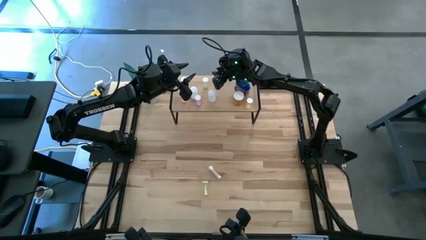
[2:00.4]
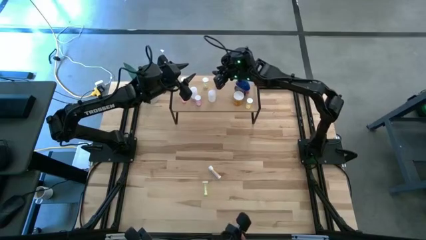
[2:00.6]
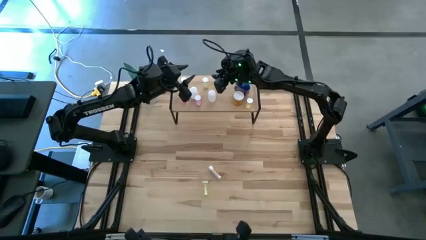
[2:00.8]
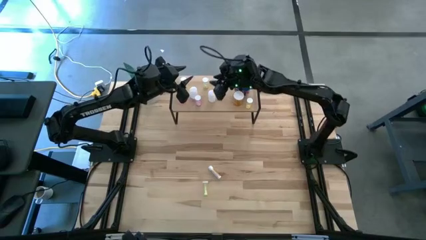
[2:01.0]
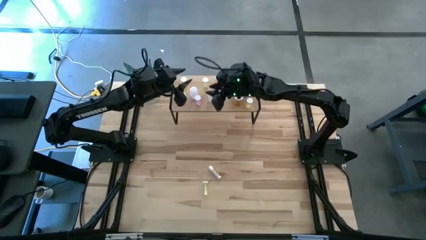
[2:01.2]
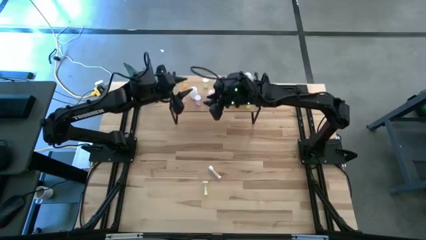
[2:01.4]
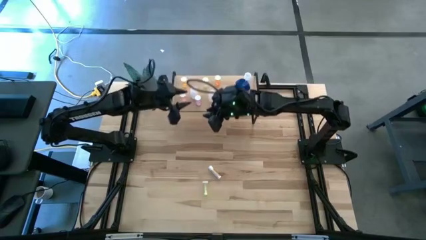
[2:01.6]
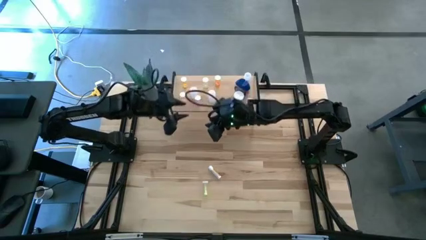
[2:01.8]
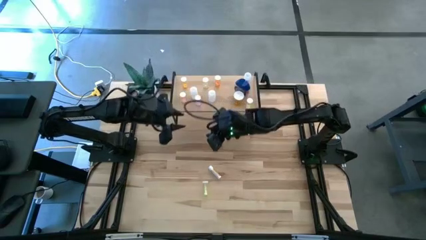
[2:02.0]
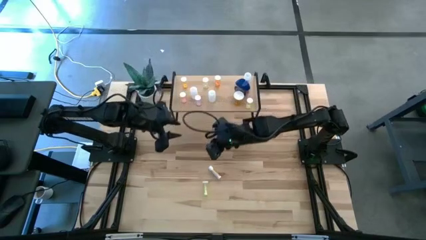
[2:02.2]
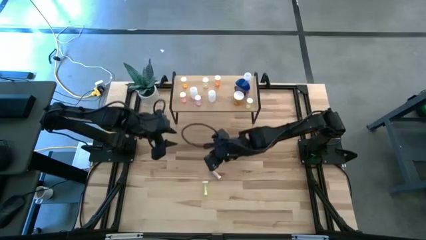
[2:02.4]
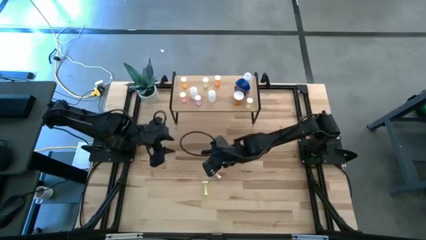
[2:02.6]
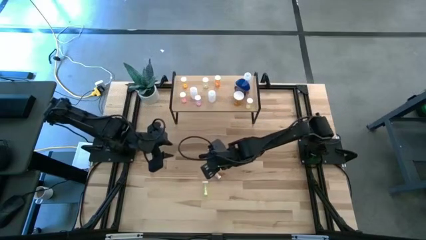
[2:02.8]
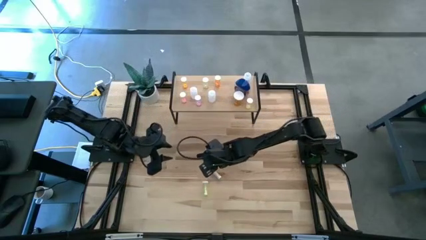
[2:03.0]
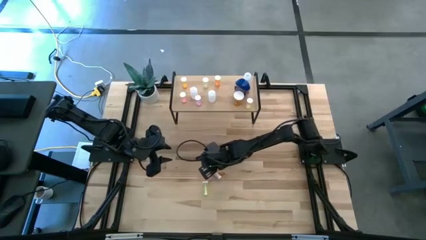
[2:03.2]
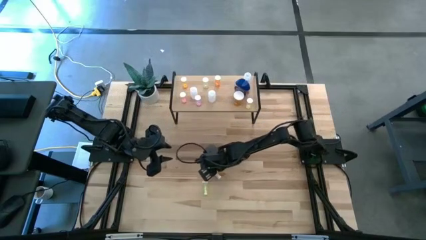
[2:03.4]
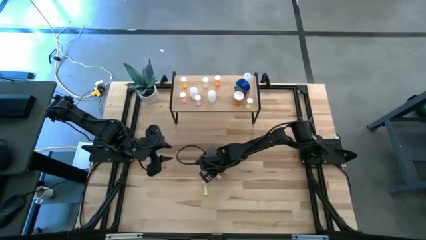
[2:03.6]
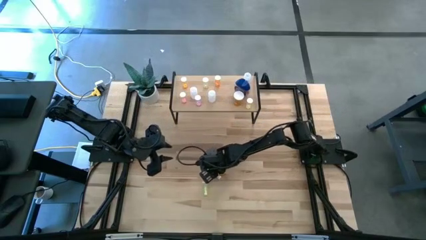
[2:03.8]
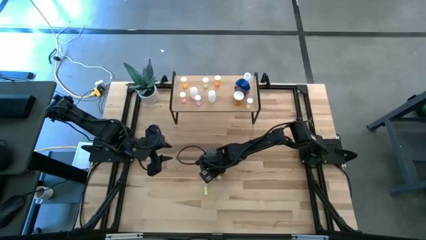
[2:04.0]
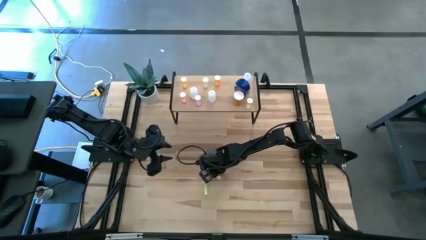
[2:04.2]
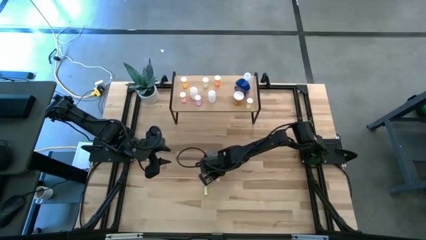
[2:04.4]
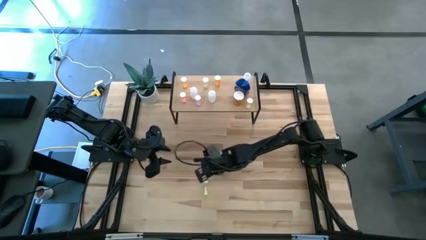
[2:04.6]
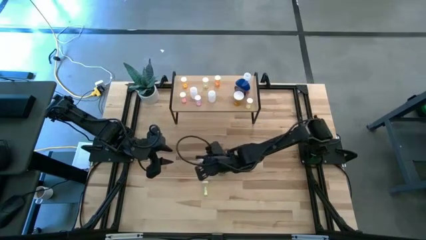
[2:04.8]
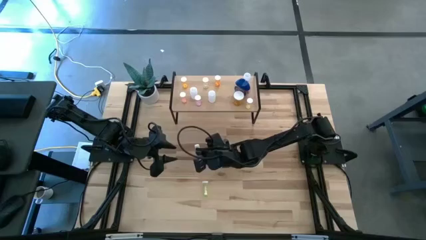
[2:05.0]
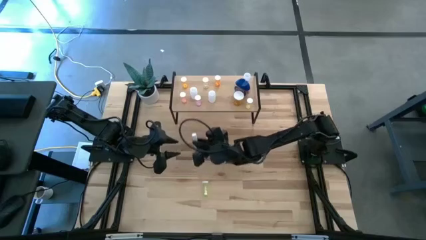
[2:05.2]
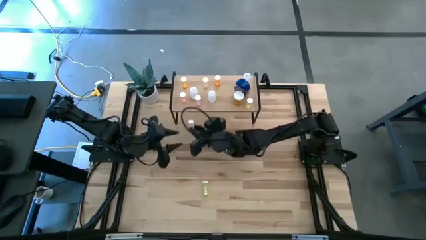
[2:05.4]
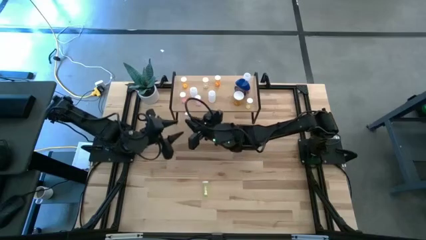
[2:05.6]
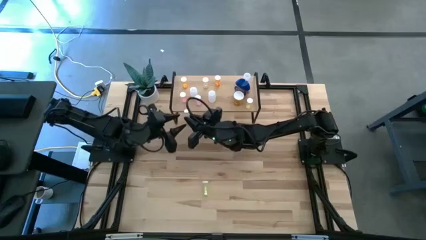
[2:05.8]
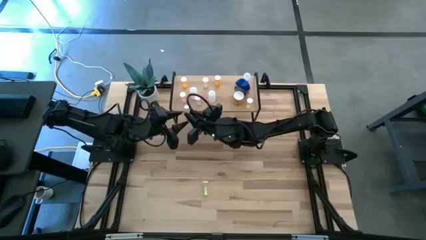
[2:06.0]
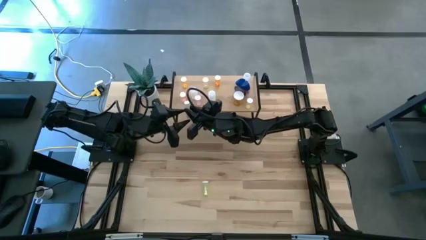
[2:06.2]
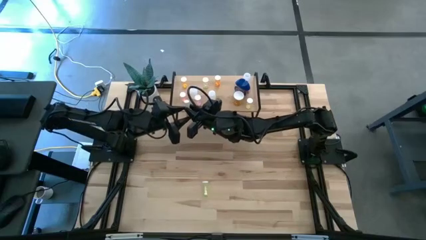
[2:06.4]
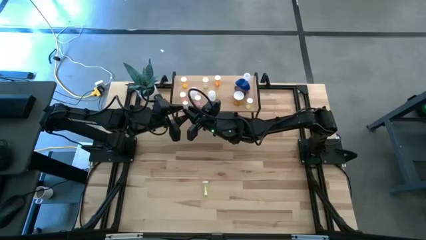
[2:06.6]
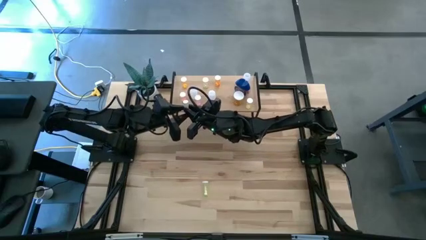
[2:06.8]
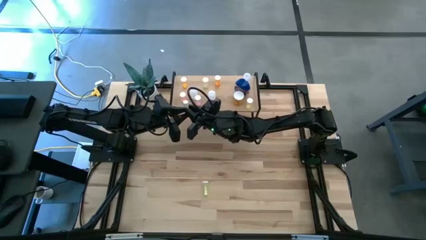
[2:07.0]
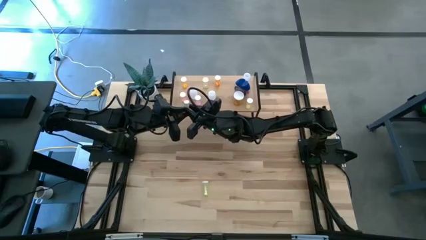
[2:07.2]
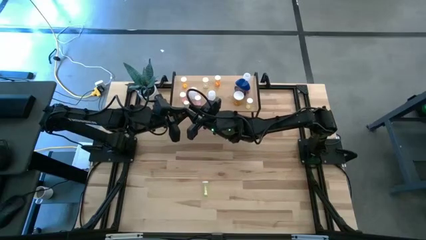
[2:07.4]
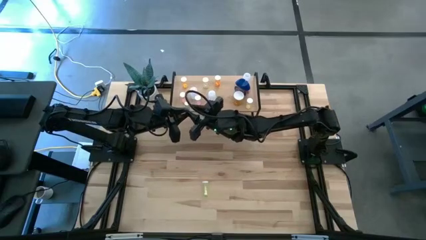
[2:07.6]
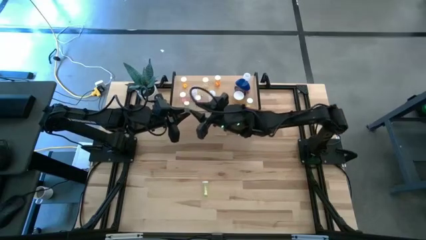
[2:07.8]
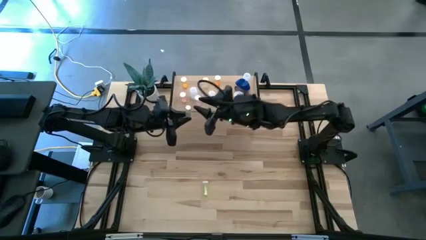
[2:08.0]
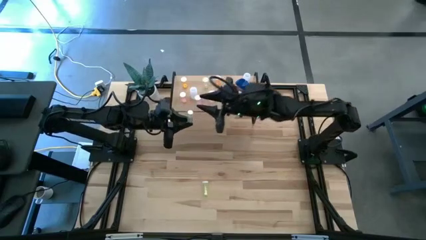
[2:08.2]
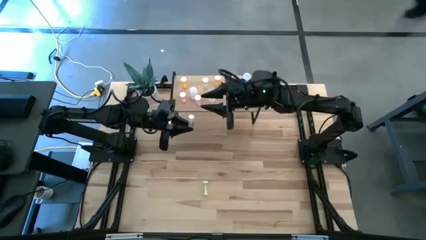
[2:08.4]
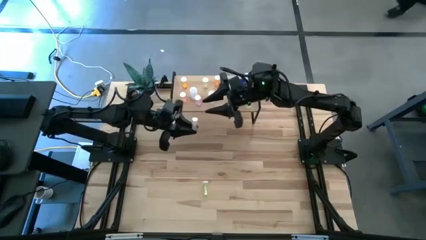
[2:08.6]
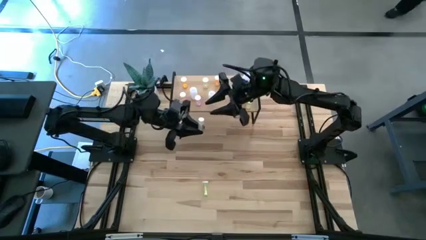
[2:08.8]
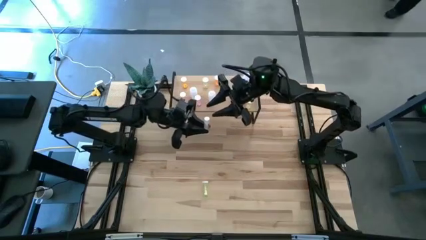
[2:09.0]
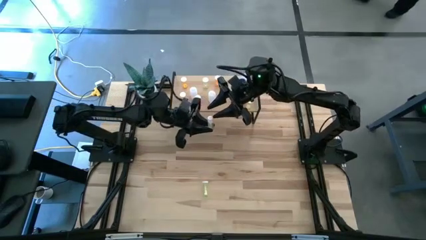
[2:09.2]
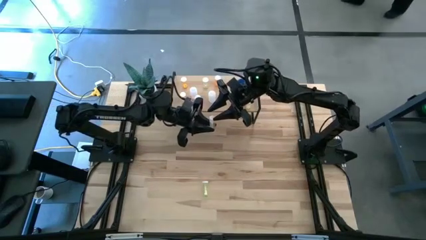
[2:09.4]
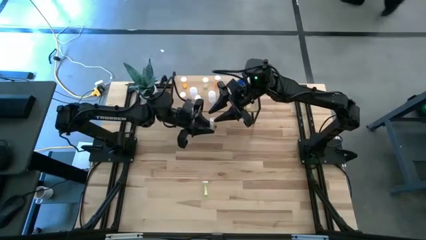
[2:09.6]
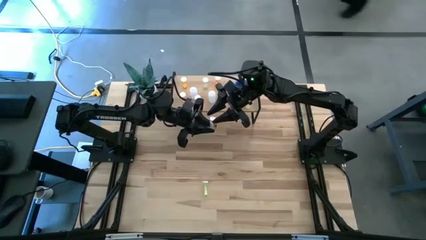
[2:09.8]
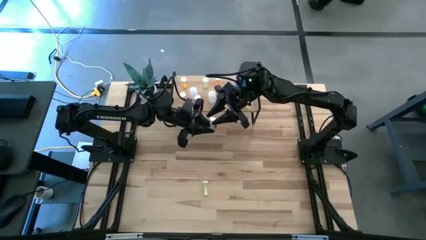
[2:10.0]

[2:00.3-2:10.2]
Task: Pick and place medicine bottles onto shelf by color
Put the white yellow pill bottle on the shelf

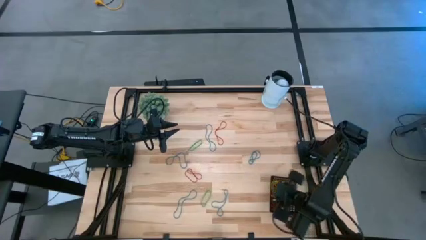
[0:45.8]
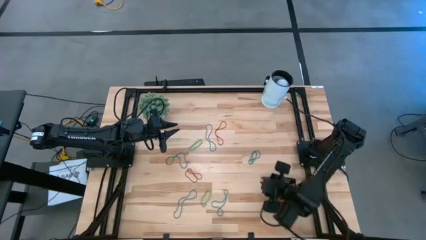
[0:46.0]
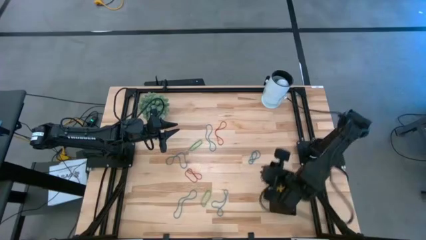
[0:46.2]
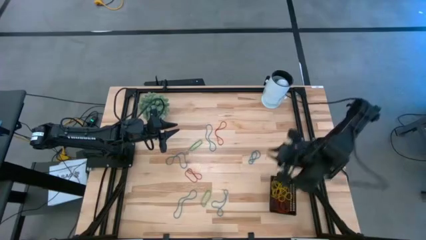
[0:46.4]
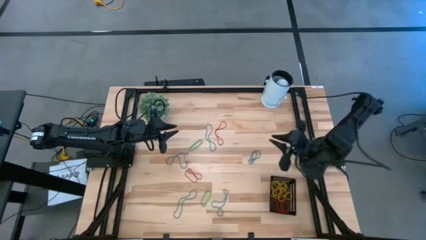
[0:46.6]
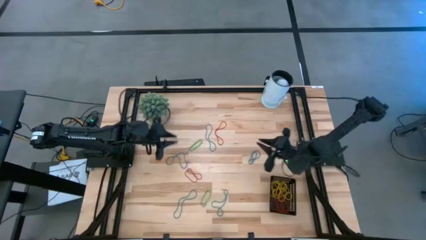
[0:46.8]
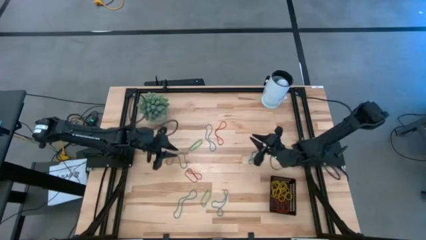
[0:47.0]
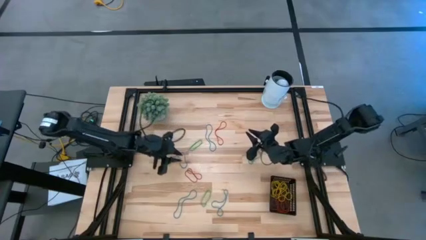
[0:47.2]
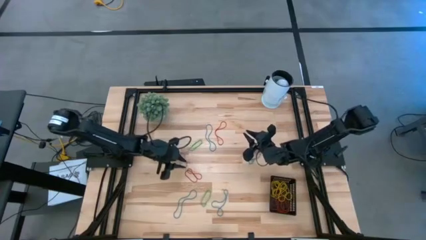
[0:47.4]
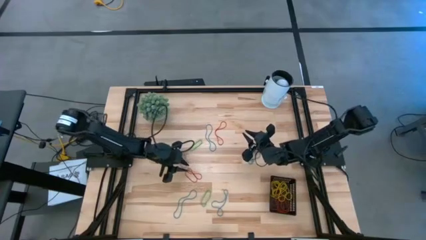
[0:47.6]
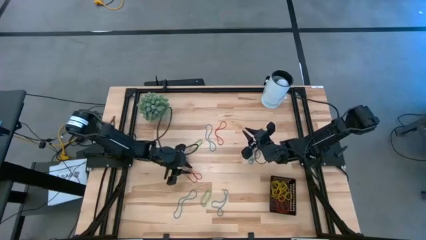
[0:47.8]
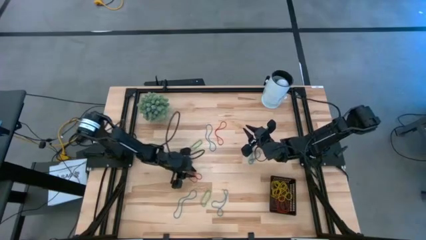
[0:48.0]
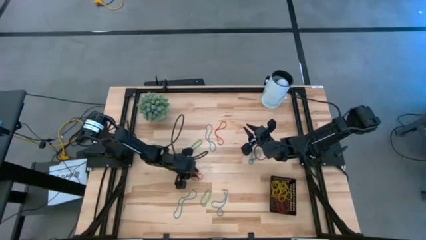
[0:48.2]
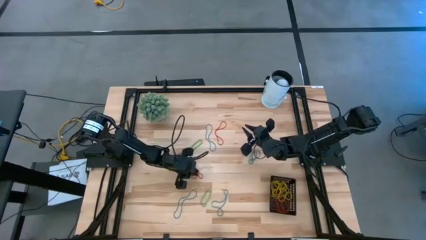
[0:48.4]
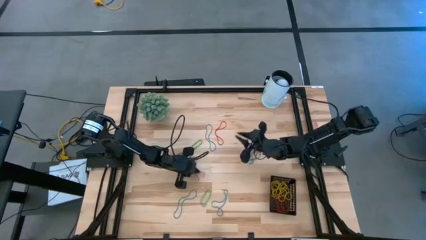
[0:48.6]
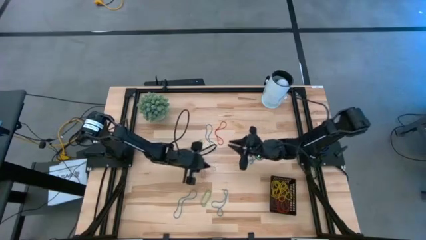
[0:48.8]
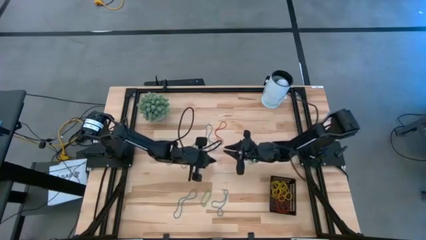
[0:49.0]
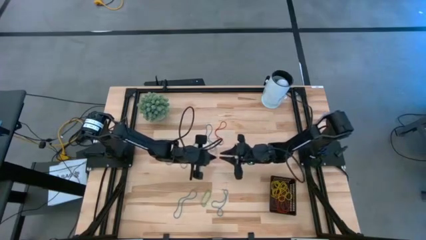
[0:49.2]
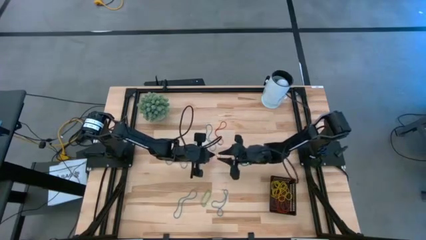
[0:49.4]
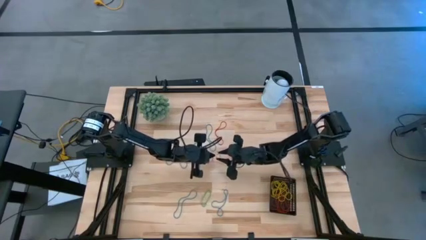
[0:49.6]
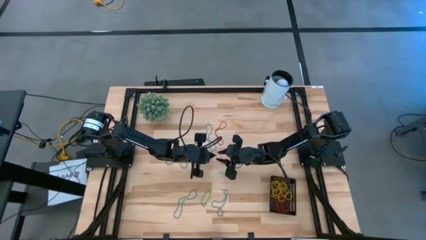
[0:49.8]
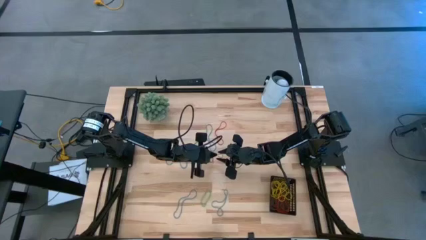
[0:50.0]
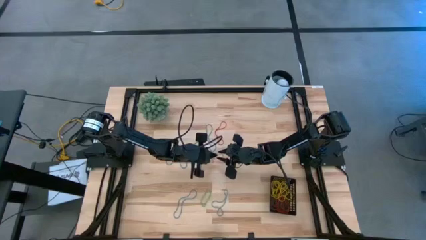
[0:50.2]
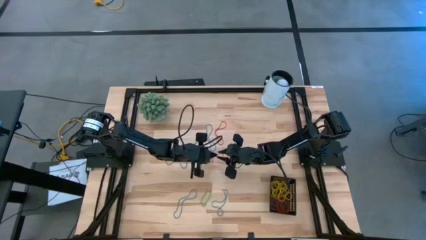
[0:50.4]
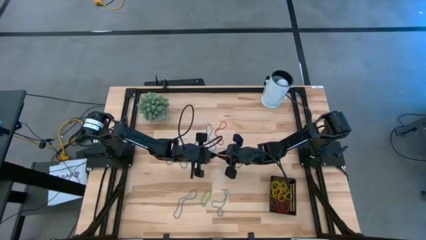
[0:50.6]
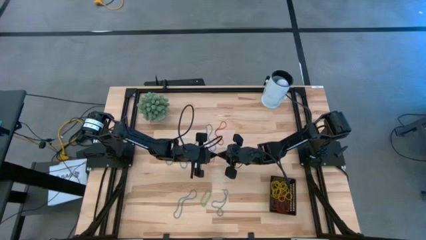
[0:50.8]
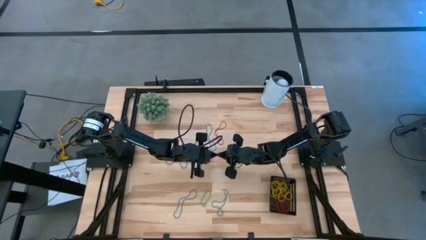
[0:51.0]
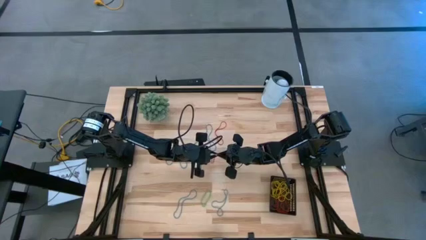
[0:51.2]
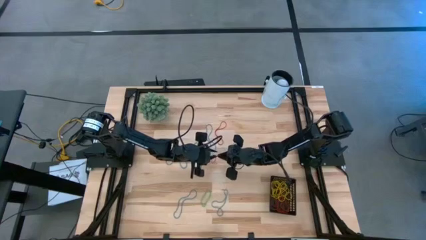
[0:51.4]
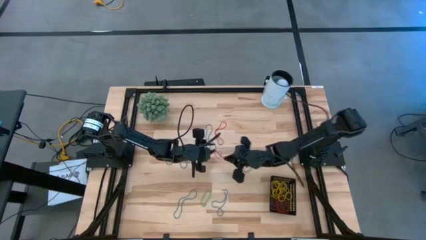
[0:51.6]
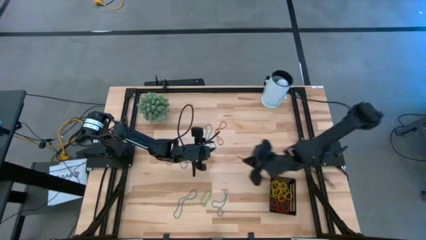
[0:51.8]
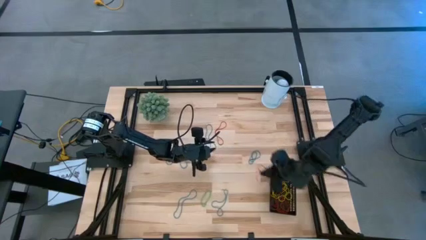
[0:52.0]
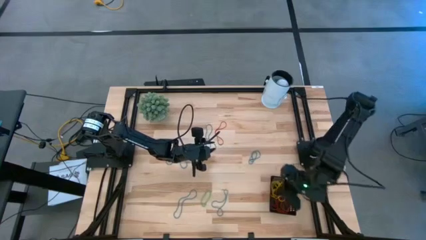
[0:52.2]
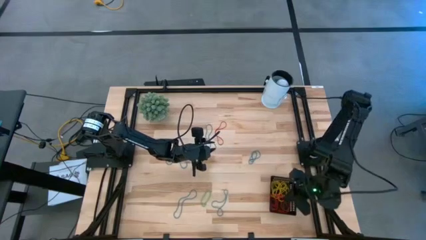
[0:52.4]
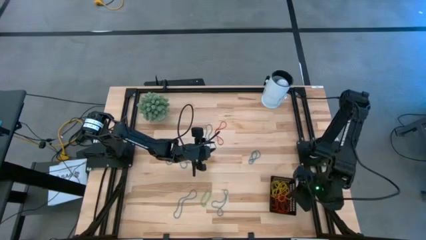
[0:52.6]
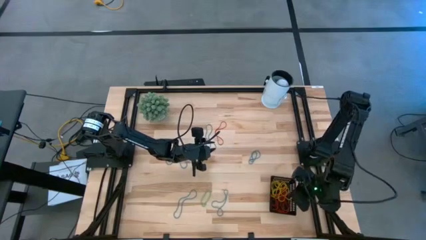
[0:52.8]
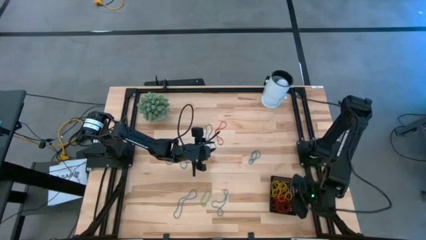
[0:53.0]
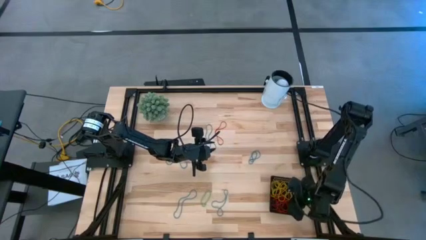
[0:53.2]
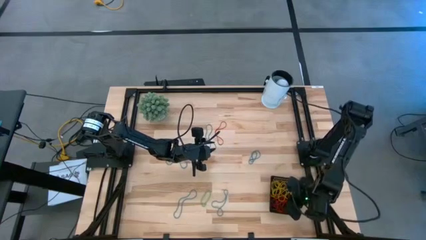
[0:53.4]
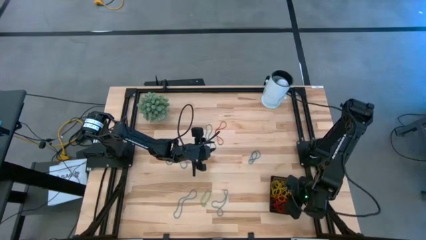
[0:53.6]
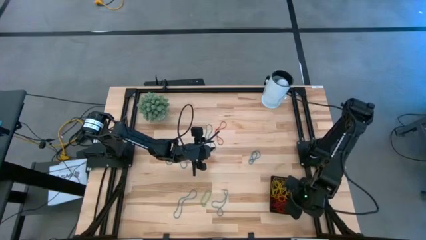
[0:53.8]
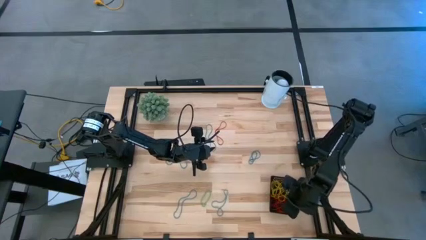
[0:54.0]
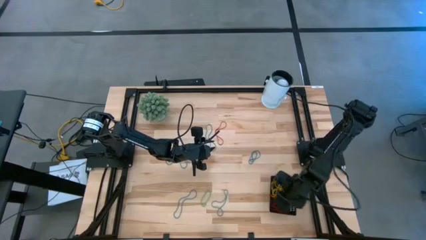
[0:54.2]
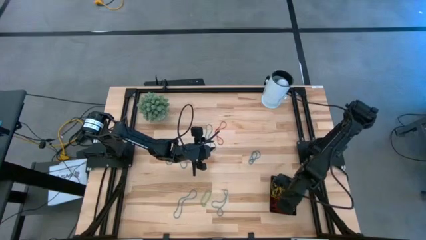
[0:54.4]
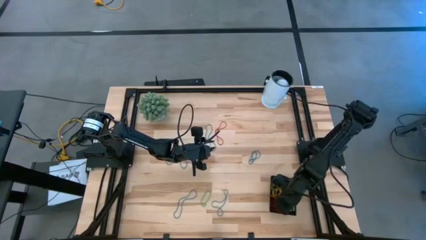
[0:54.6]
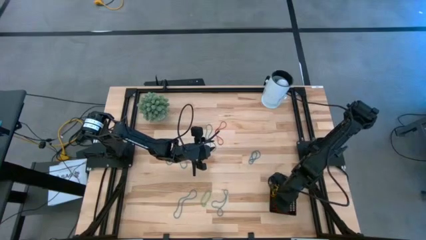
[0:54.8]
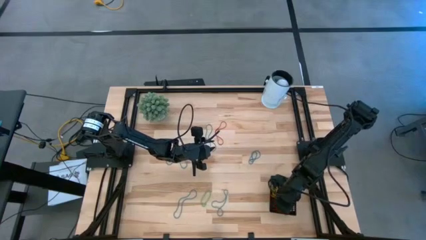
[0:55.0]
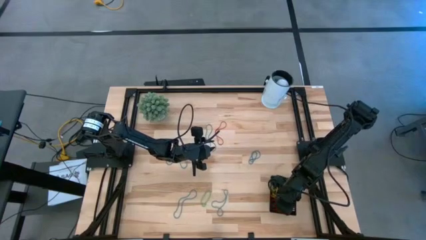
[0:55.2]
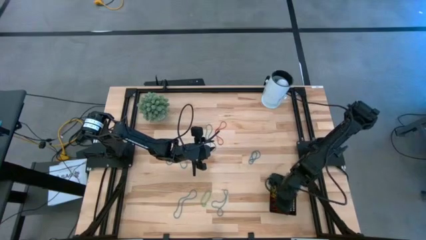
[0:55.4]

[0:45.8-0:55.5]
Task: Pick and place items into bin
Put the left red rubberband into the black basket
